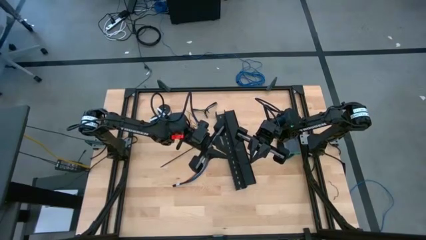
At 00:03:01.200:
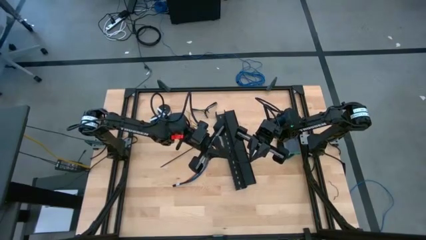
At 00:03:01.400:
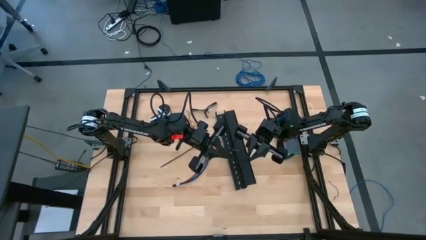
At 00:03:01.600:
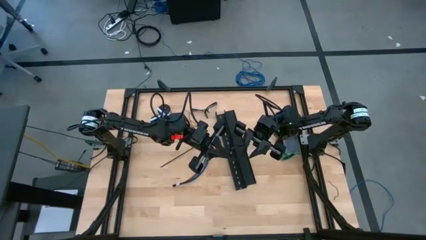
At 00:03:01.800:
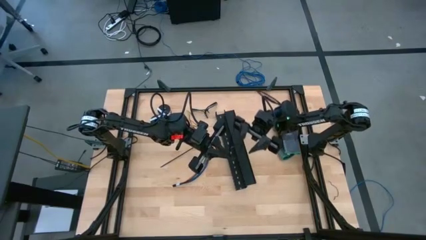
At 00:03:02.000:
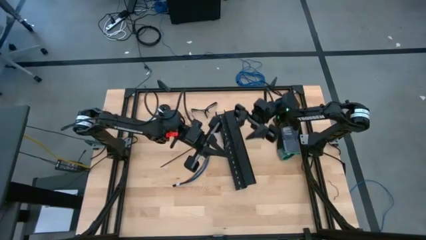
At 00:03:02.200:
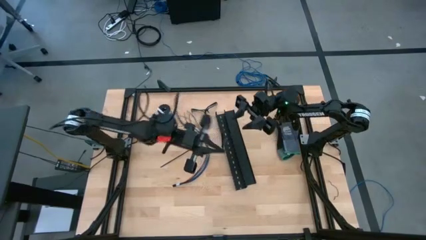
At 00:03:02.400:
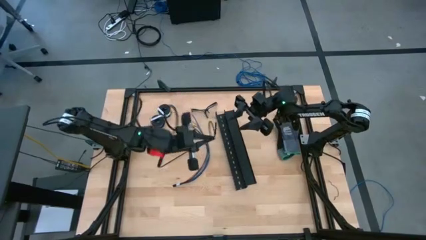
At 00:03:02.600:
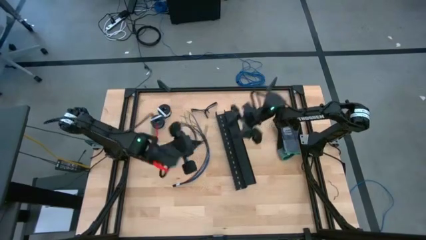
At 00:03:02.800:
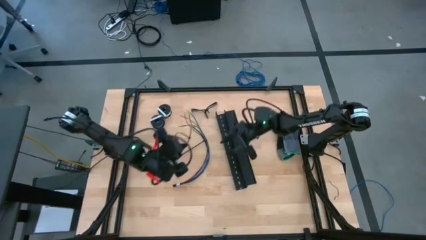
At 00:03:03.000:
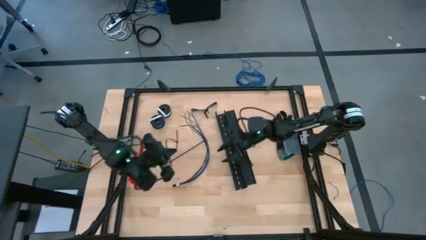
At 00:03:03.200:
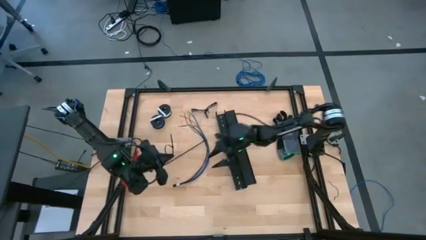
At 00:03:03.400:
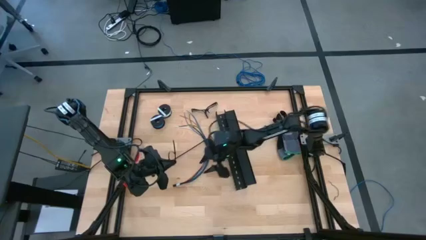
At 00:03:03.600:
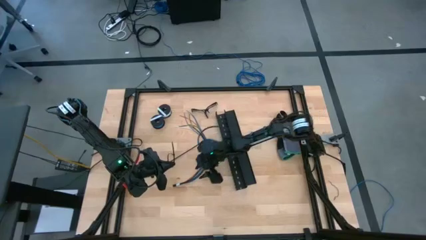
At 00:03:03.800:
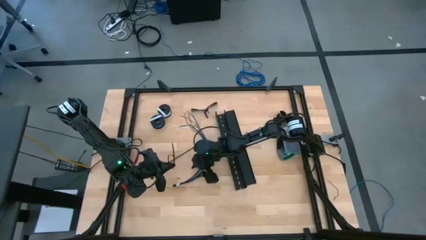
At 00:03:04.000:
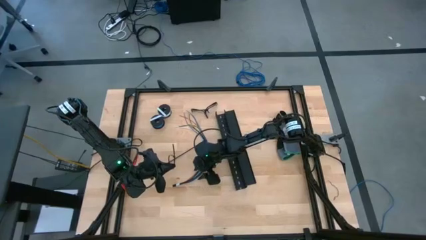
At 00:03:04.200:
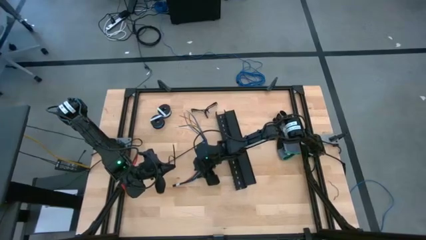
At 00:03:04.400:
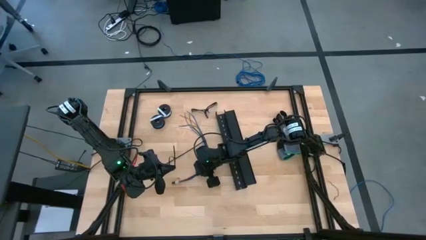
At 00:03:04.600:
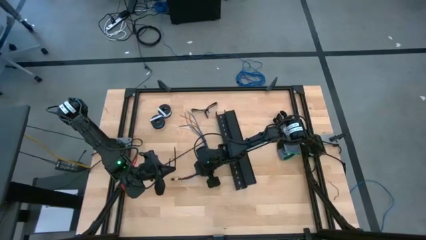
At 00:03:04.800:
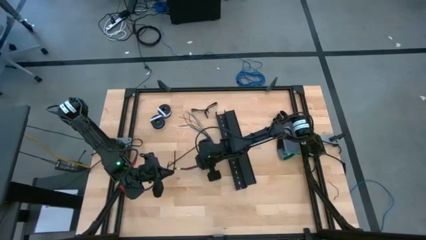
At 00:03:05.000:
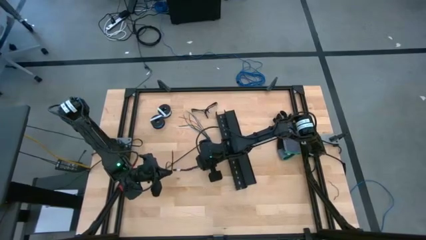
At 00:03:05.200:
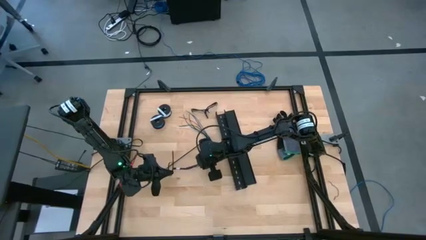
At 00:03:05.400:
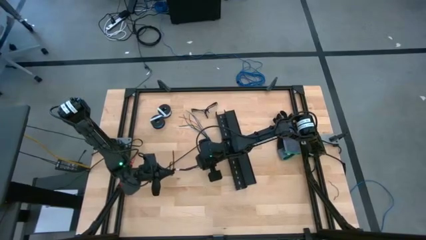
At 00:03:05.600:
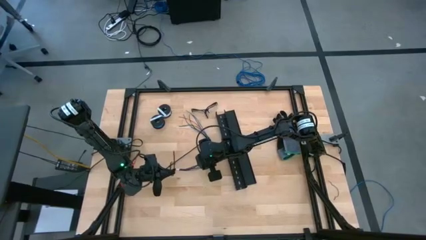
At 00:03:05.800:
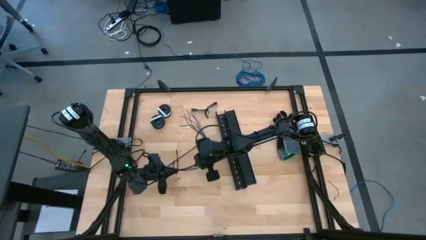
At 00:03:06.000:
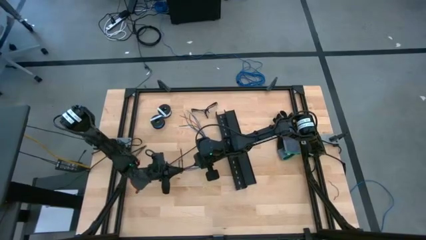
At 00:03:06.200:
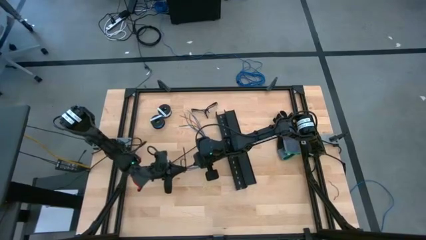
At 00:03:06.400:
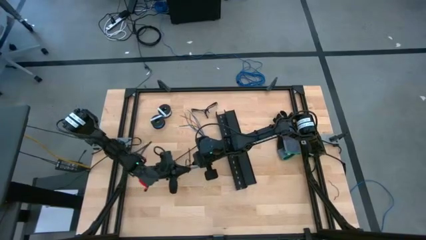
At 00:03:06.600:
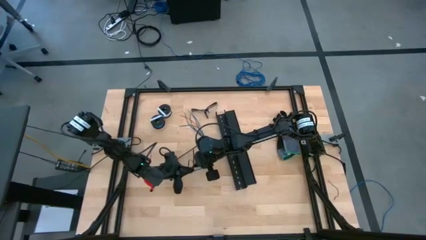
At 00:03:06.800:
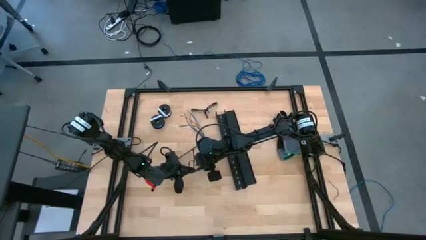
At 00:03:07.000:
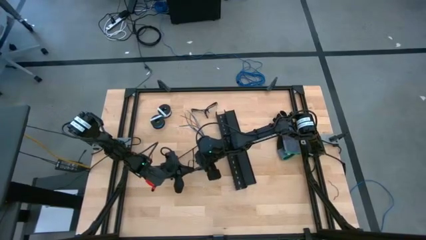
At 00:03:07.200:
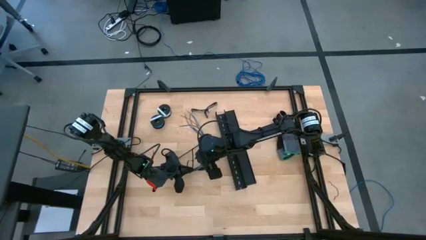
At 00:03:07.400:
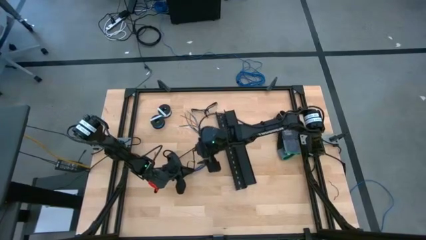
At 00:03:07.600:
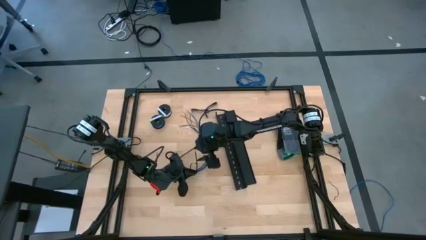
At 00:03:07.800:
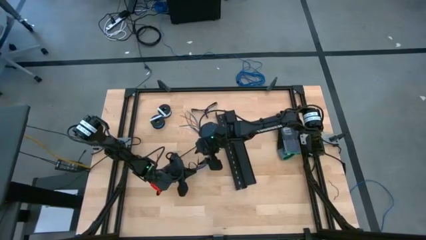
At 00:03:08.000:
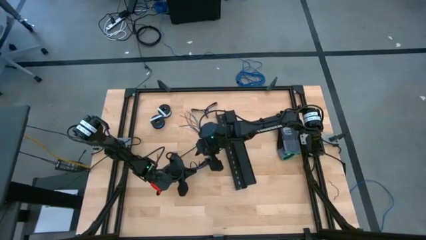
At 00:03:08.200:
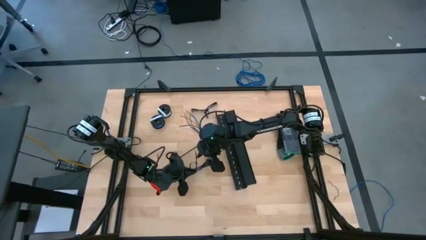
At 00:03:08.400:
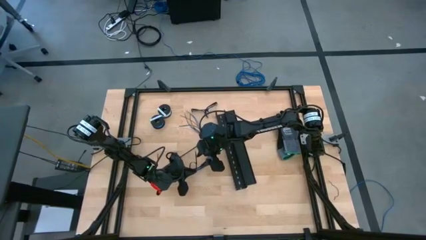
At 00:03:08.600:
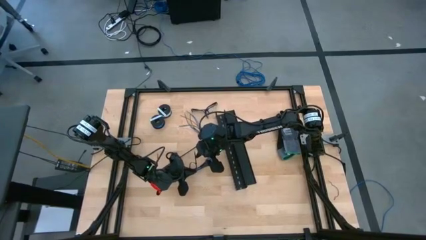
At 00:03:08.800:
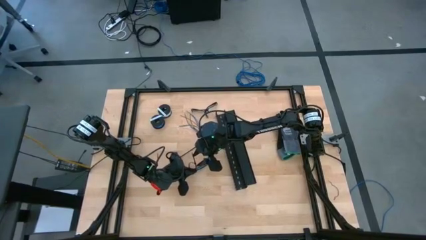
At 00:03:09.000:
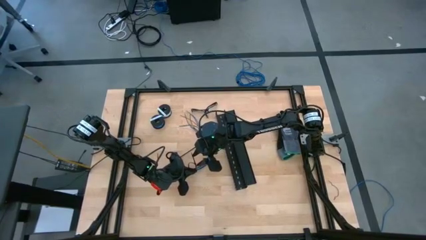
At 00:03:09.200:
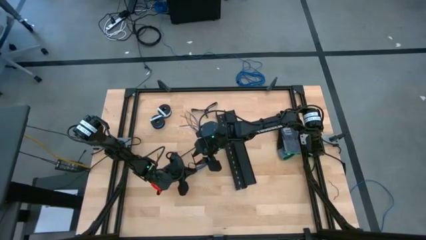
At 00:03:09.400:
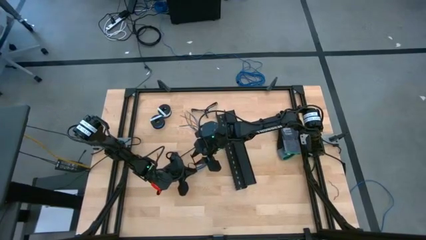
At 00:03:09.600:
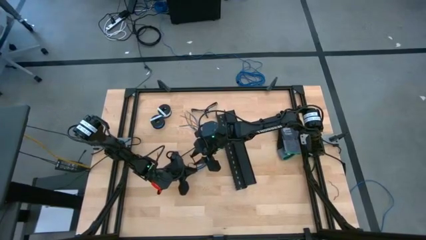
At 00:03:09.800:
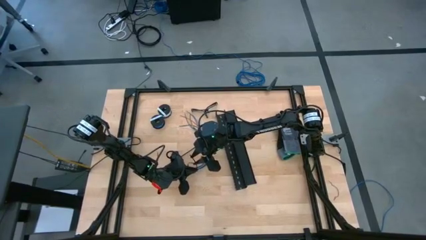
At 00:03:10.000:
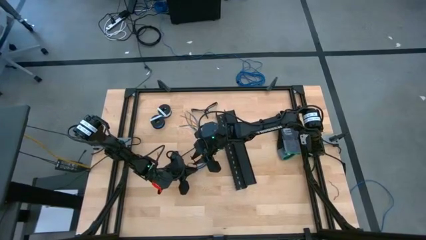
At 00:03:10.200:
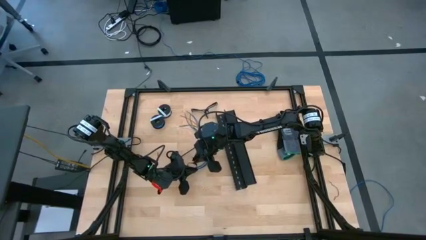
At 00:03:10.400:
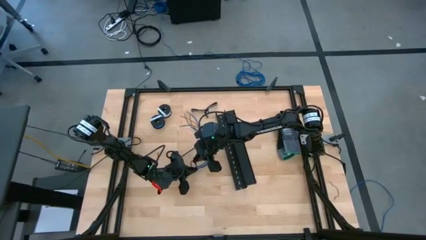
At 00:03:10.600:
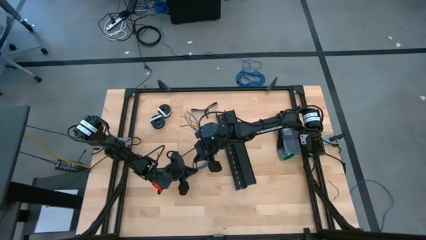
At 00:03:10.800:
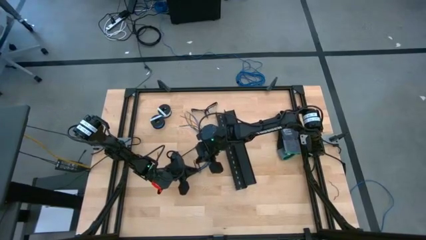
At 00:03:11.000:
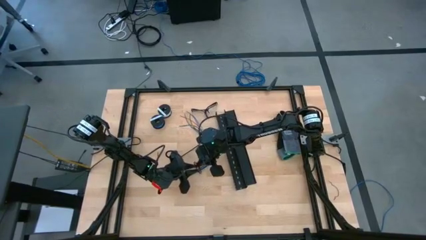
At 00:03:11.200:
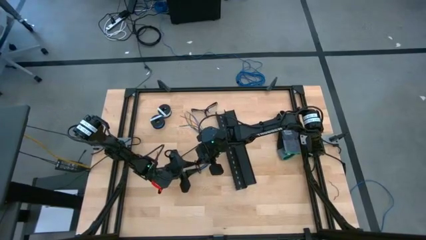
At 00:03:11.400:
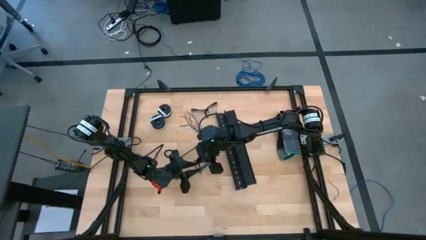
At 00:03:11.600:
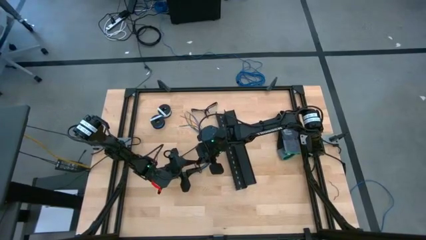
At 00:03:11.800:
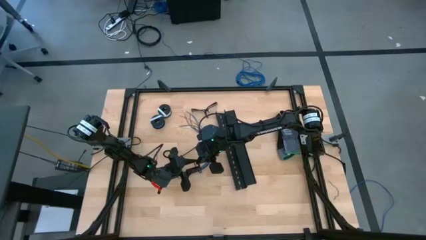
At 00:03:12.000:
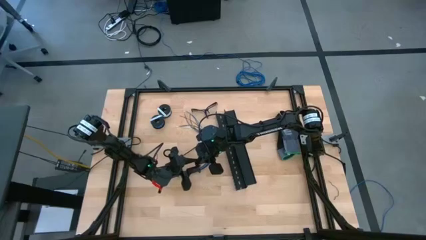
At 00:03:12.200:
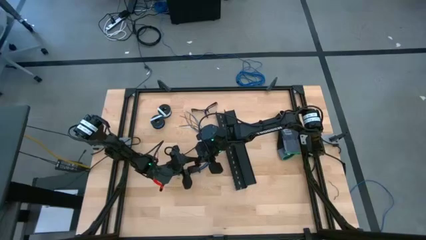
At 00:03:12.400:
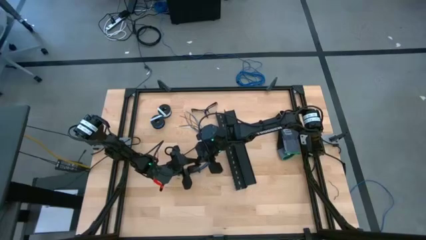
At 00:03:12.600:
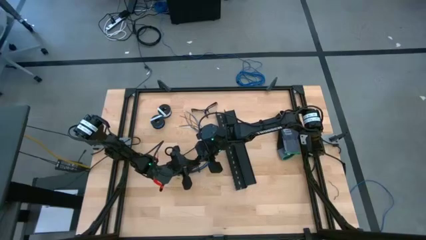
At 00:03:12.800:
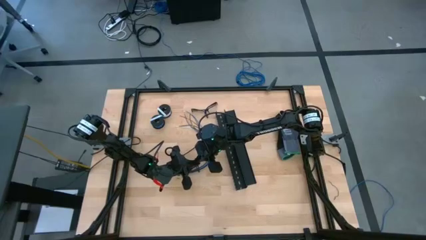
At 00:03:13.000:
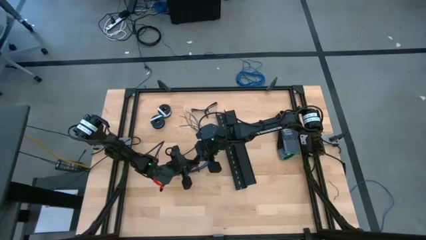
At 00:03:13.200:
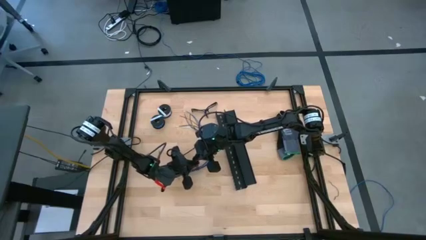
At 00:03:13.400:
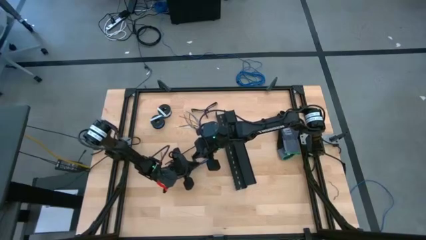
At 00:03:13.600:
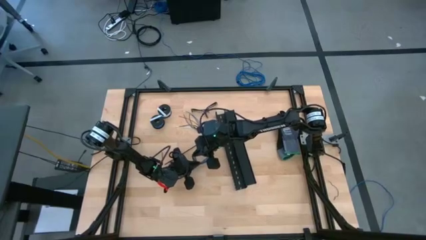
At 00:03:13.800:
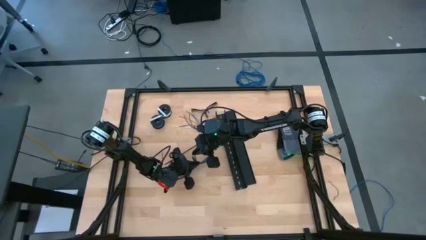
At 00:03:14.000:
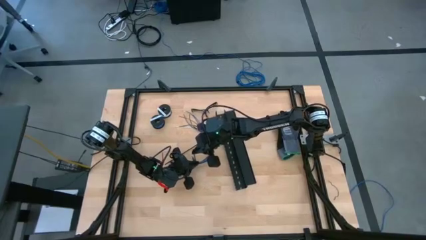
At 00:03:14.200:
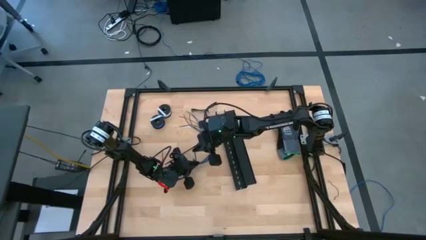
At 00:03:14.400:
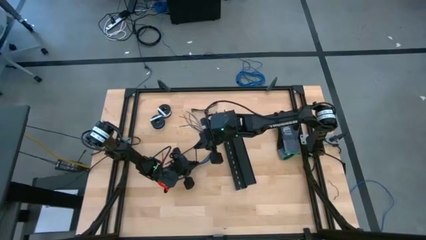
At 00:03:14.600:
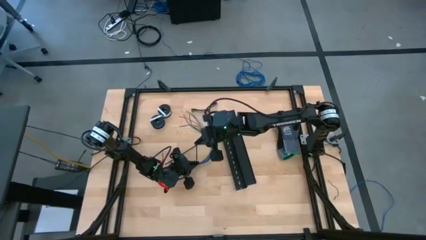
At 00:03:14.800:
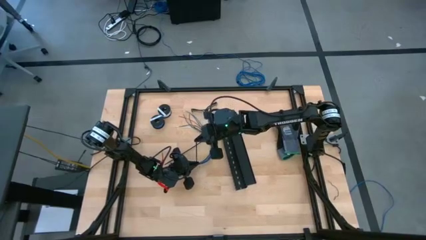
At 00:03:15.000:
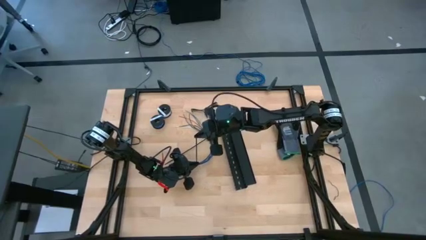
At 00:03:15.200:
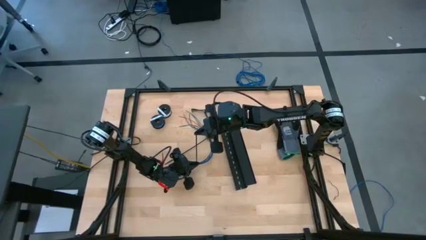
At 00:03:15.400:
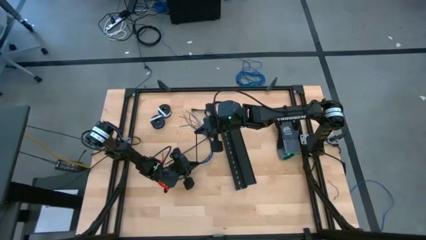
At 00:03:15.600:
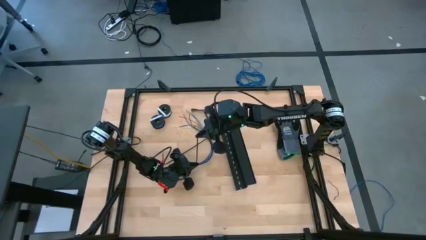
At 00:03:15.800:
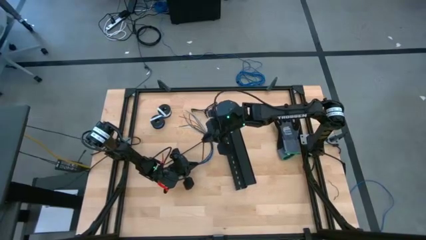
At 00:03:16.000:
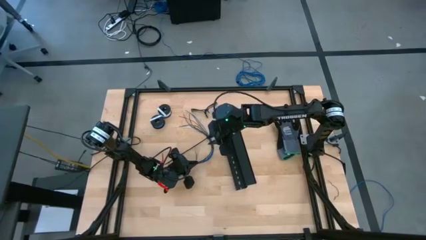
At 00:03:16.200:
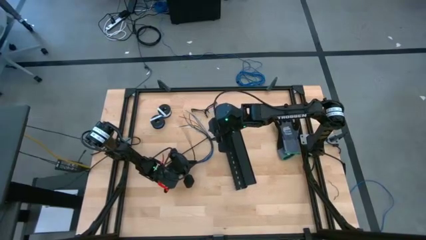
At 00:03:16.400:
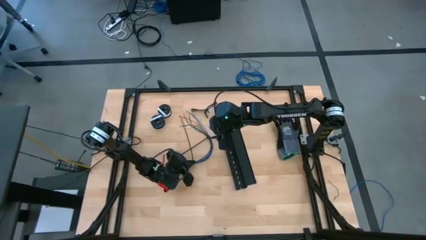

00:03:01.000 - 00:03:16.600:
Task: Ziptie cables
Wrap the black zip tie on the cable
